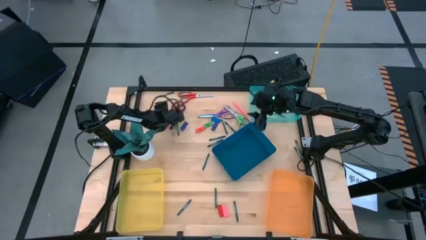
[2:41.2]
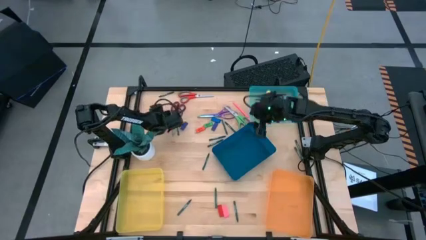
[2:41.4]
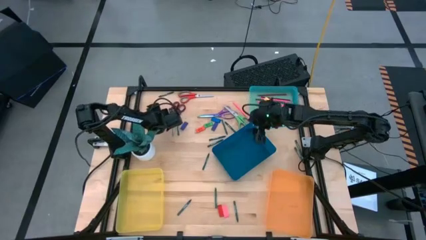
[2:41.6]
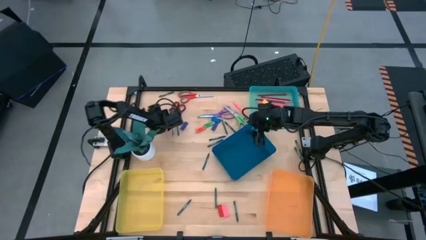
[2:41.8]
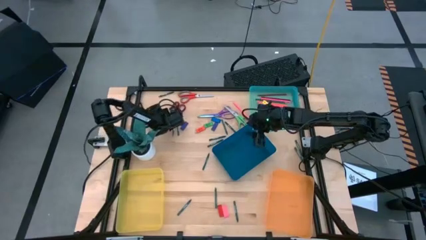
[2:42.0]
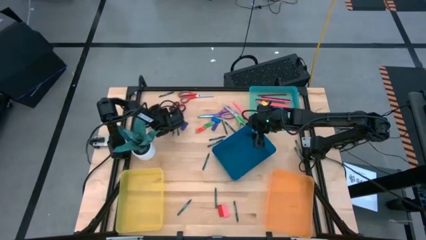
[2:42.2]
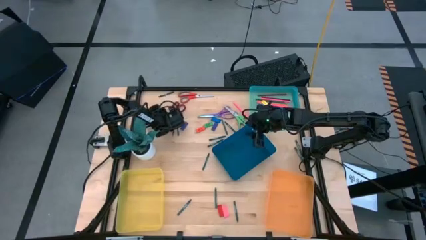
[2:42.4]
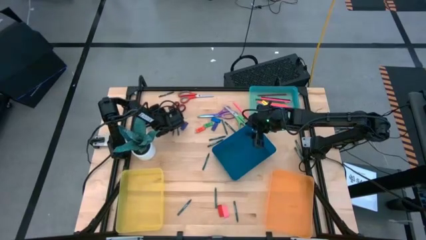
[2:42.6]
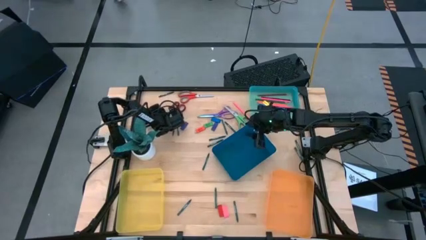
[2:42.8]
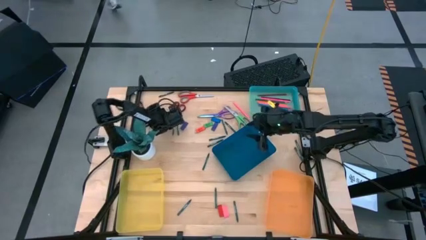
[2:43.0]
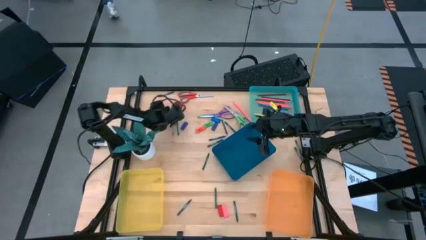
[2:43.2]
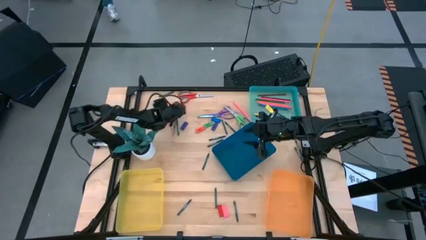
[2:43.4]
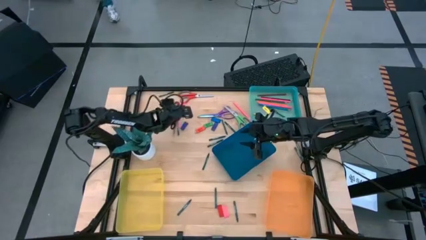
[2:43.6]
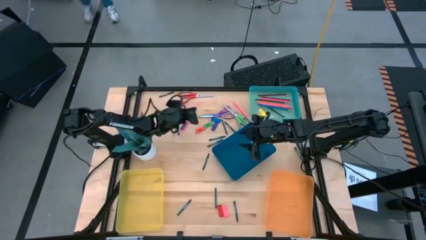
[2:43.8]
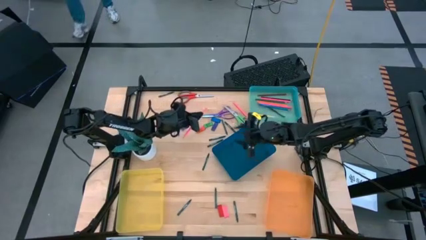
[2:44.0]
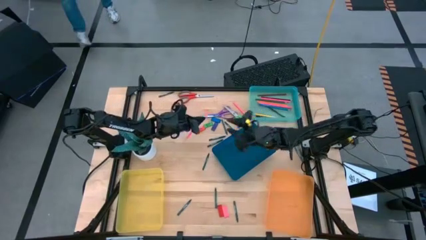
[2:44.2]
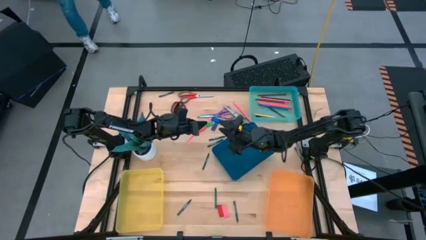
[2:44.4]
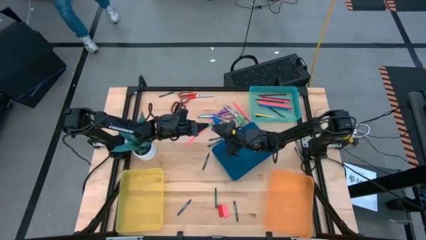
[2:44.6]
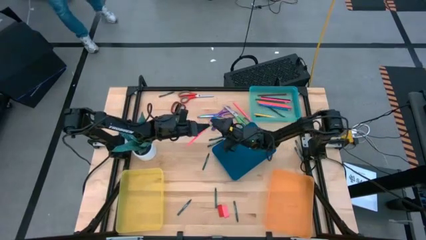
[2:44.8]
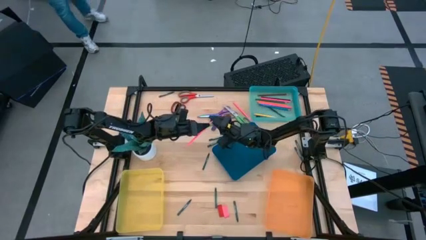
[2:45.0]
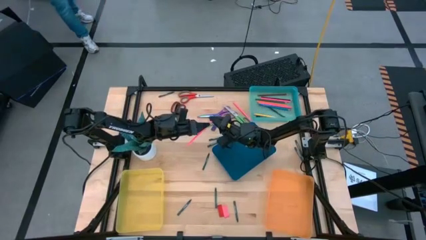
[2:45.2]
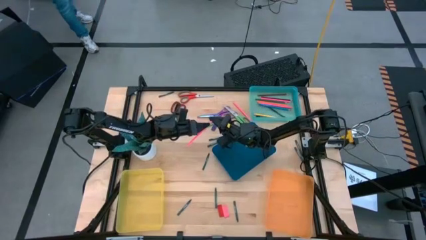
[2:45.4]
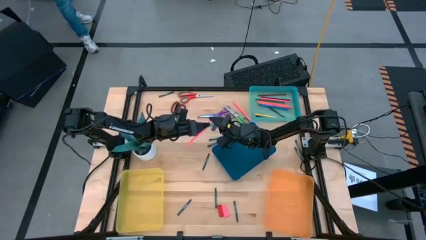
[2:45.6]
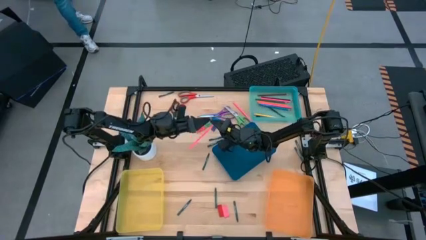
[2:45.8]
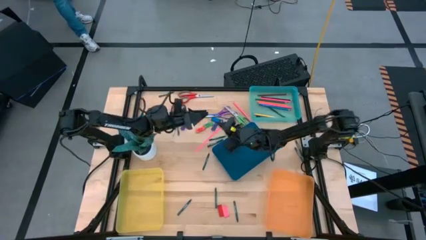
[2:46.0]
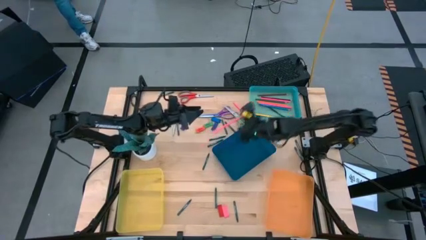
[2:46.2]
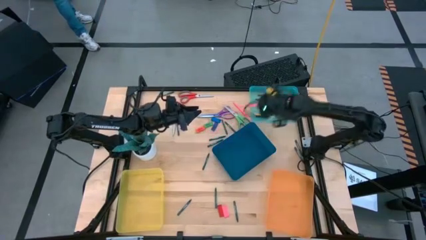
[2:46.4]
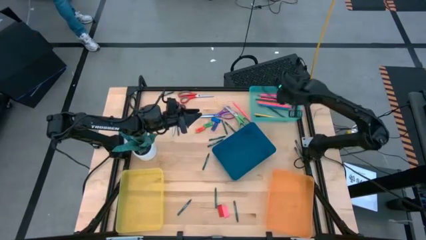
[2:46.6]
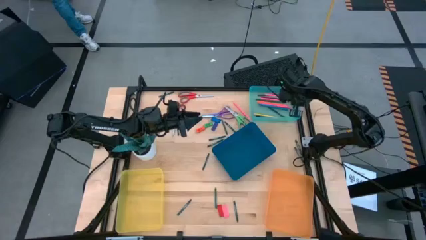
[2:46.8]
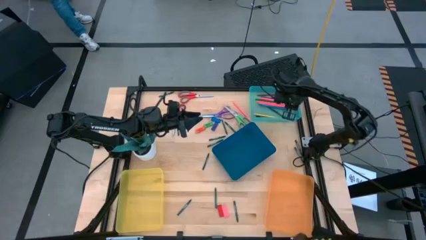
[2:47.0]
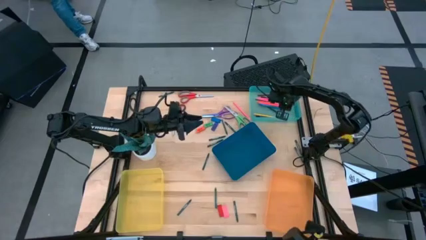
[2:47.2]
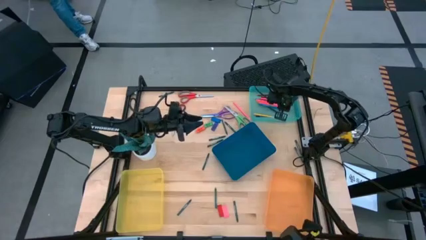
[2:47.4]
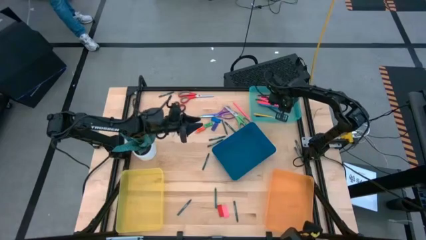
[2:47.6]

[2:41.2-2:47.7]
Task: Sort crayons/erasers/pens/pencils in bins
Put the pink pencil into the green bin

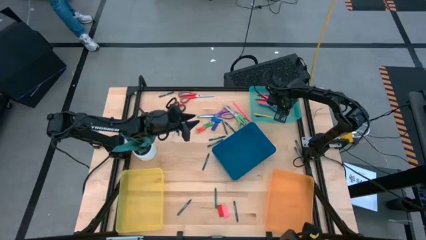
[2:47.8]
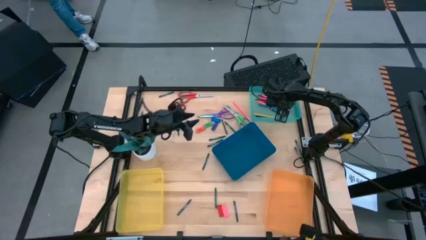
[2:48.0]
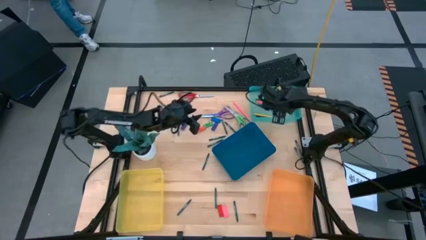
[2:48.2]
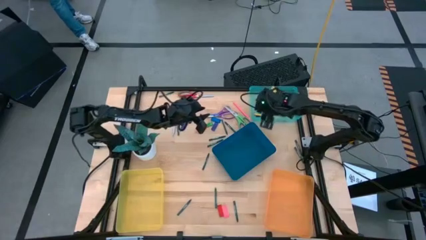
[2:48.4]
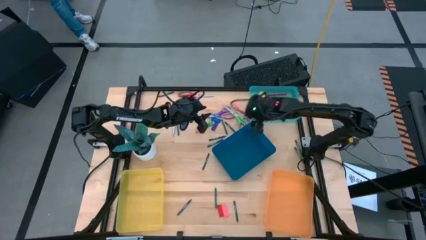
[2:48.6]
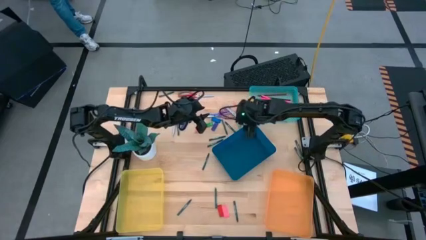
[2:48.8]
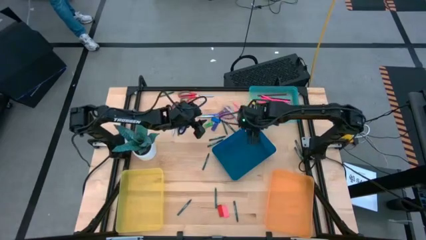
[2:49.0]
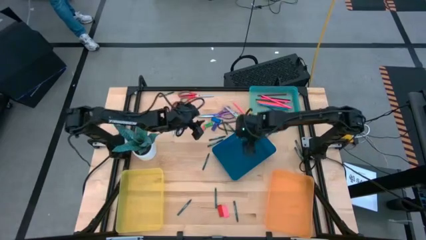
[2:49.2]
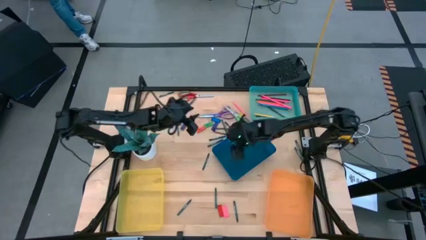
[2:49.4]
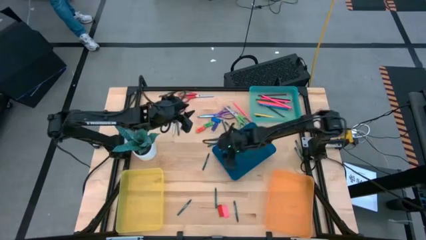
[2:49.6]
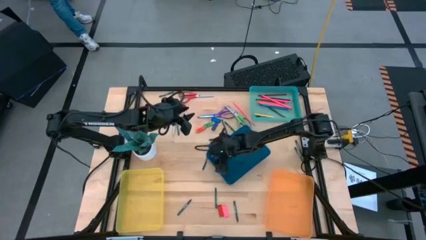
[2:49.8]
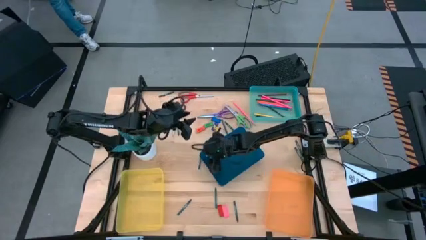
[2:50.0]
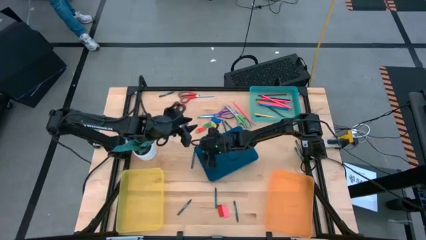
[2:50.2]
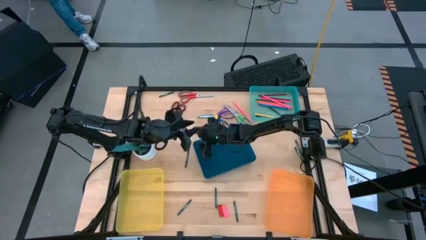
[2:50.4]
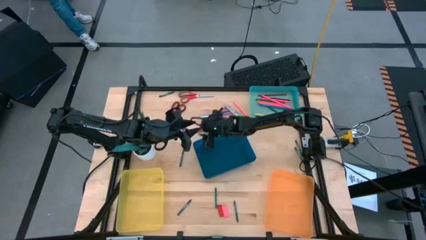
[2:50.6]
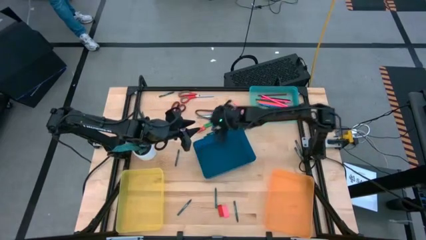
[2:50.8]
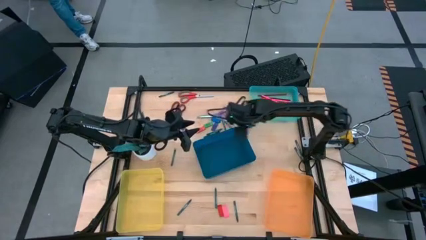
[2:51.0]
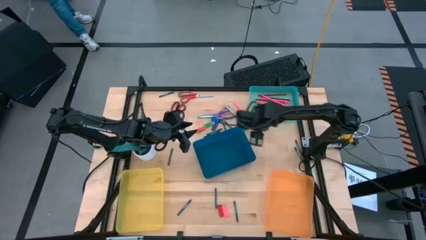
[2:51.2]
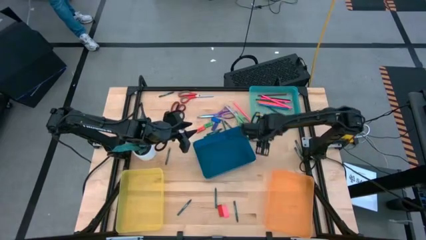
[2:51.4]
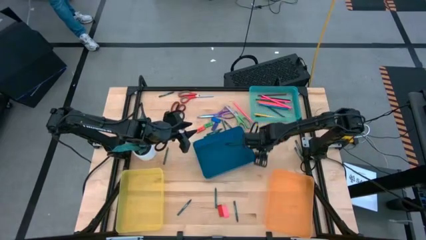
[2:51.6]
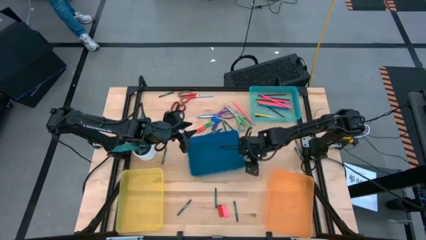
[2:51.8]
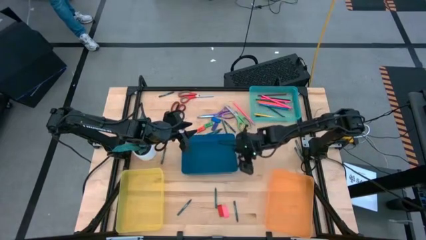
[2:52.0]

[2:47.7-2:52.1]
Adjust the blue bin

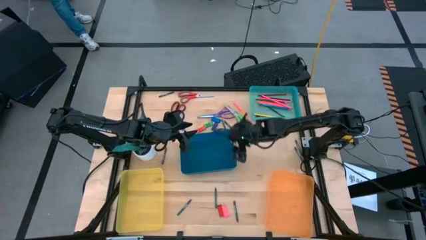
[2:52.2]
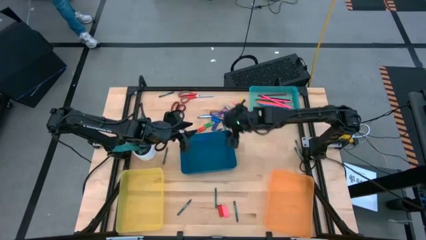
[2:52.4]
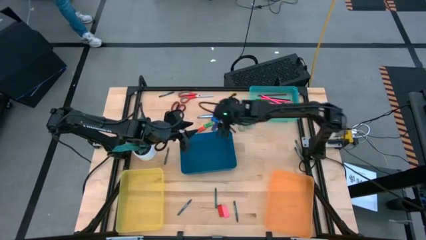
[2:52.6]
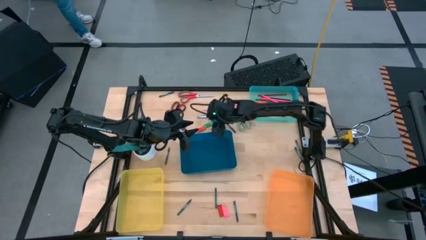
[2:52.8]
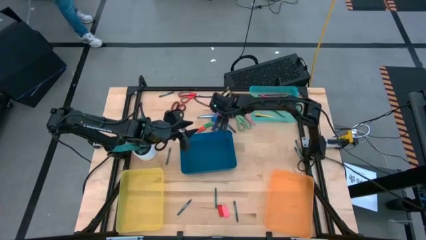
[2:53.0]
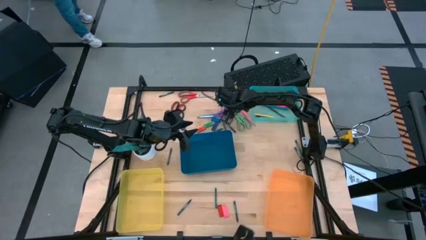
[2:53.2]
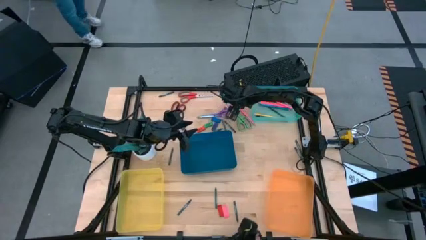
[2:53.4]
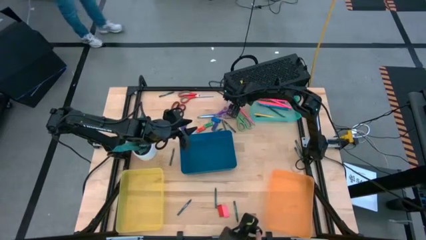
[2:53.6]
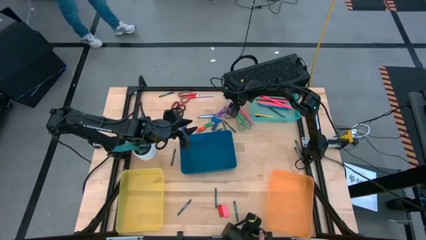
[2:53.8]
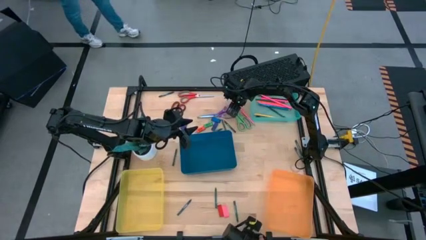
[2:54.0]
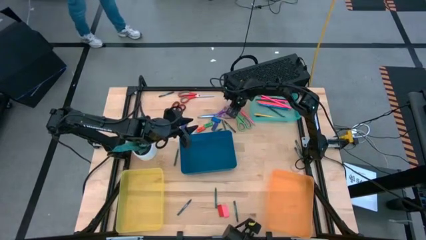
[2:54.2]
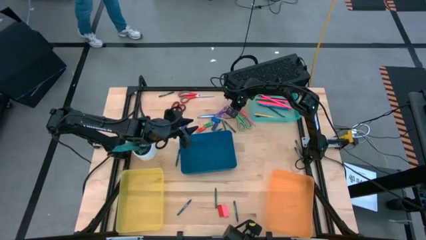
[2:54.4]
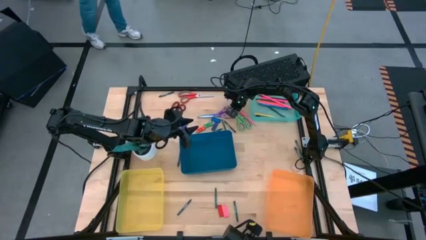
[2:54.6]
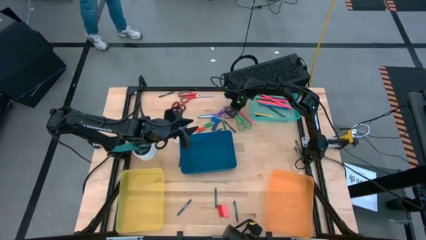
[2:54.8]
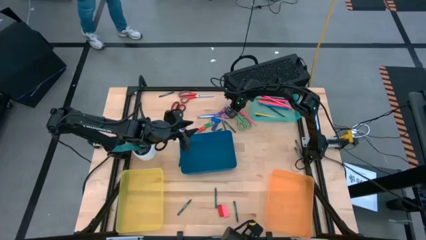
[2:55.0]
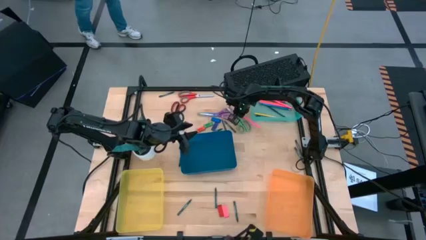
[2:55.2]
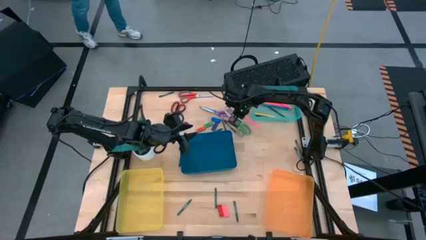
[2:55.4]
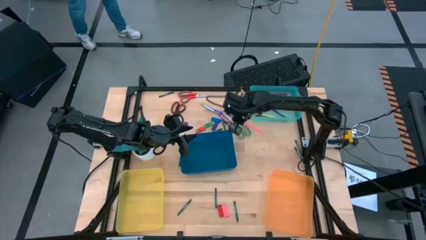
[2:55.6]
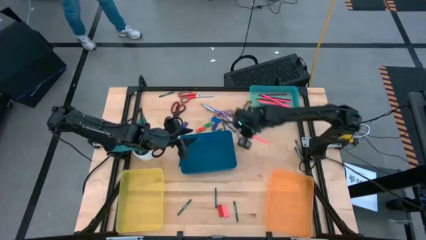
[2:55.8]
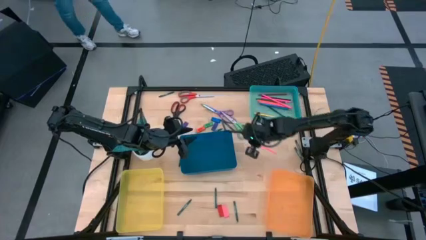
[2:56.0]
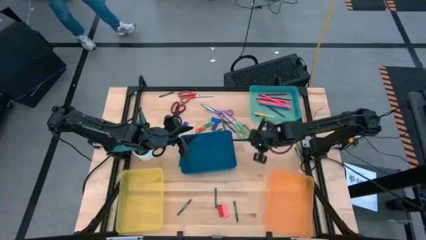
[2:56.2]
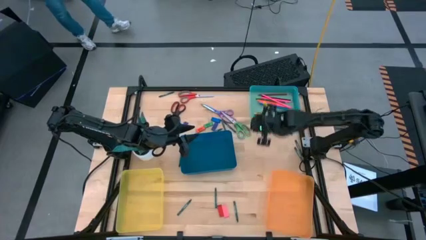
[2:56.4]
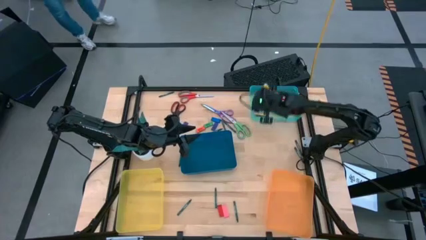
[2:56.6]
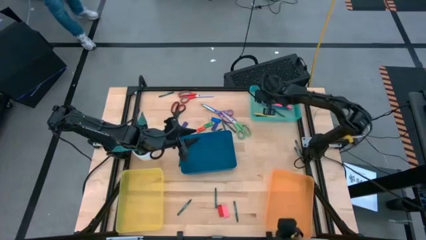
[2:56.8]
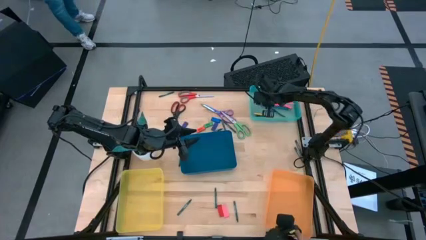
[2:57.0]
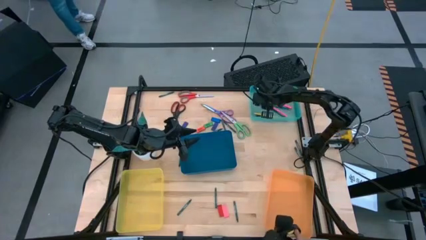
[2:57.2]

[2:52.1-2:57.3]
Put the pink pencil into the green bin
